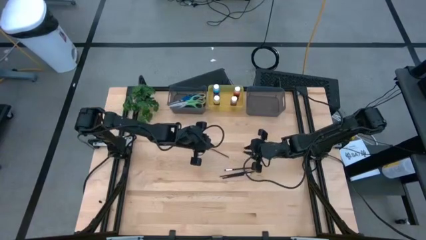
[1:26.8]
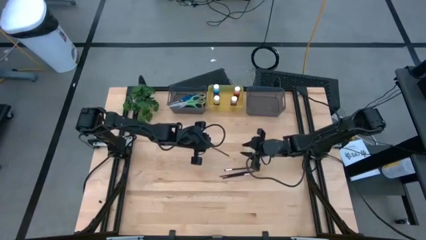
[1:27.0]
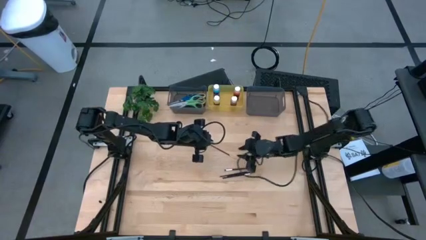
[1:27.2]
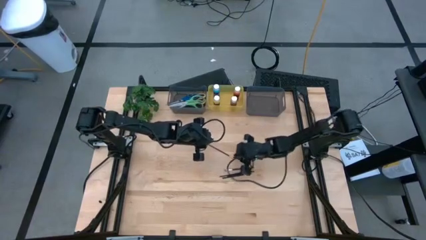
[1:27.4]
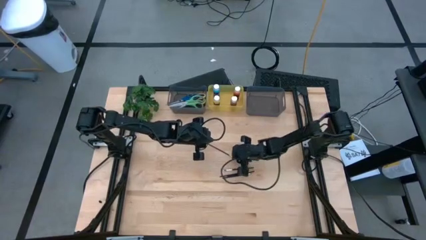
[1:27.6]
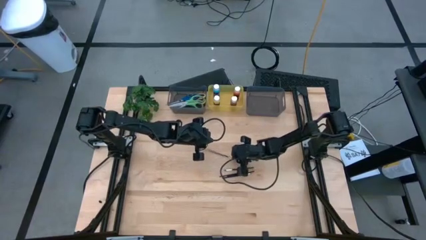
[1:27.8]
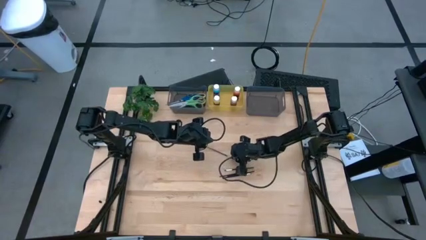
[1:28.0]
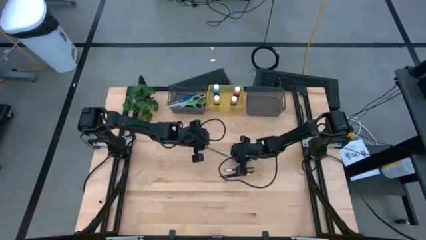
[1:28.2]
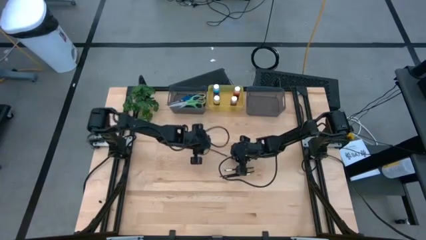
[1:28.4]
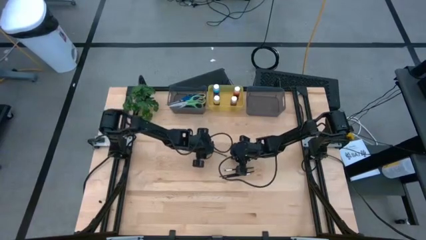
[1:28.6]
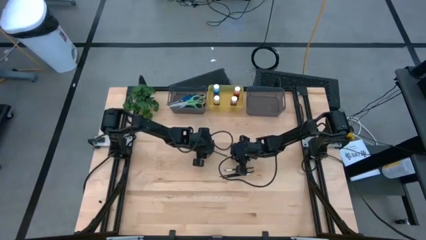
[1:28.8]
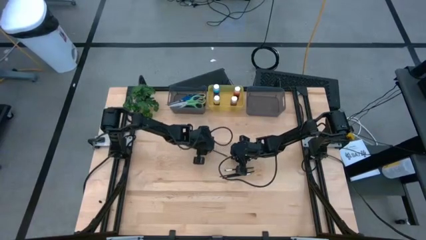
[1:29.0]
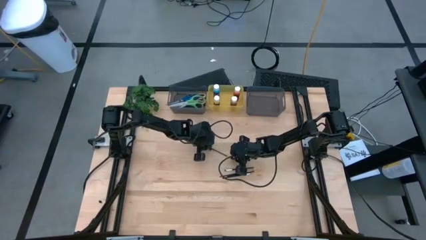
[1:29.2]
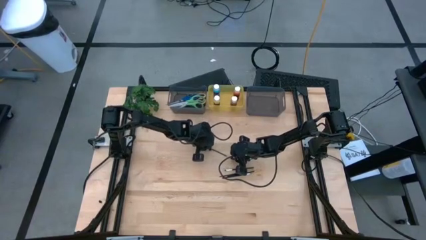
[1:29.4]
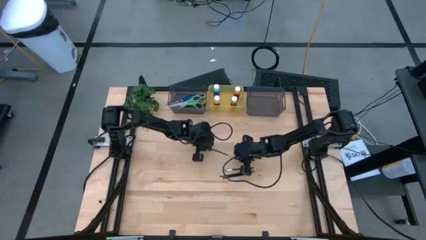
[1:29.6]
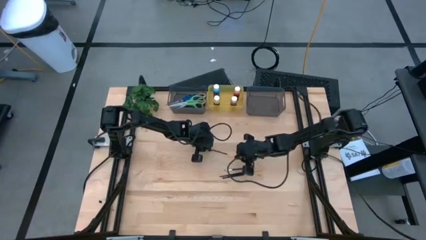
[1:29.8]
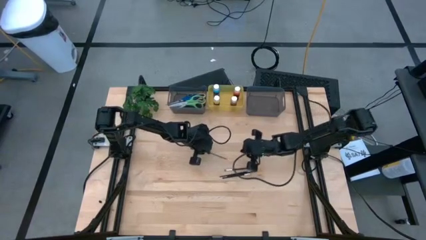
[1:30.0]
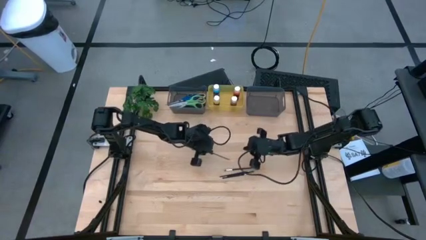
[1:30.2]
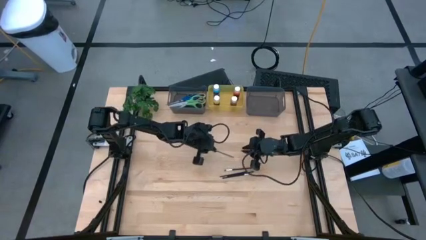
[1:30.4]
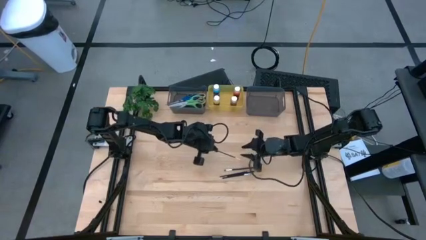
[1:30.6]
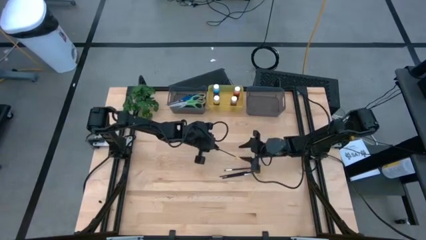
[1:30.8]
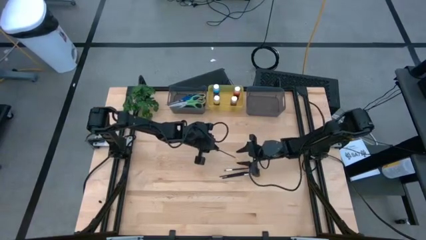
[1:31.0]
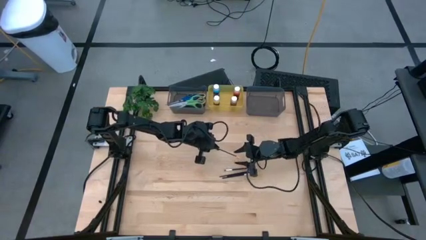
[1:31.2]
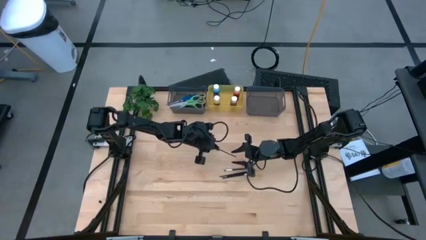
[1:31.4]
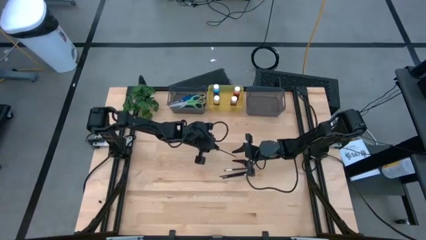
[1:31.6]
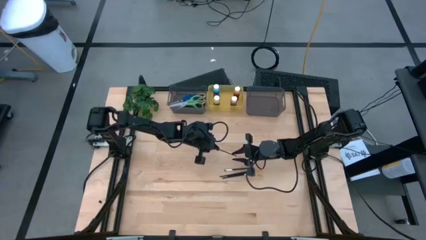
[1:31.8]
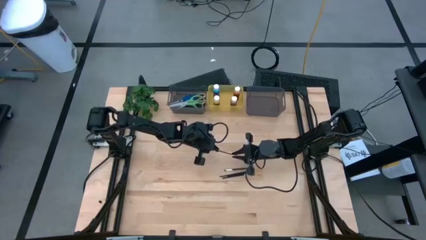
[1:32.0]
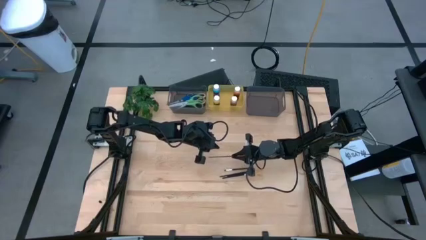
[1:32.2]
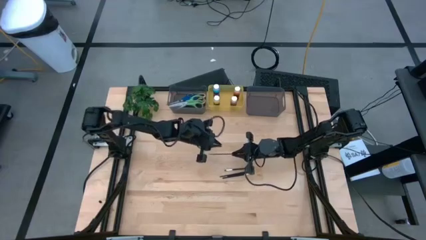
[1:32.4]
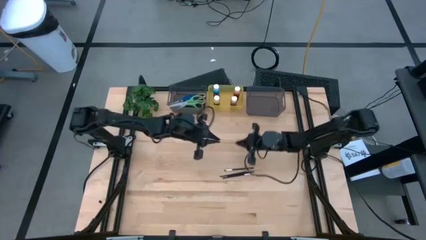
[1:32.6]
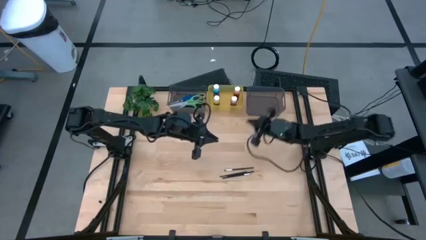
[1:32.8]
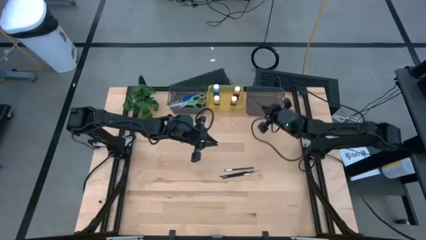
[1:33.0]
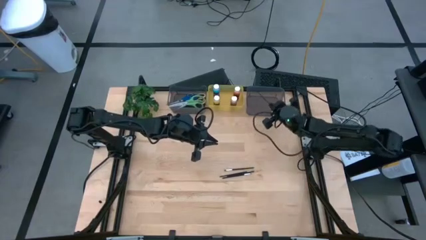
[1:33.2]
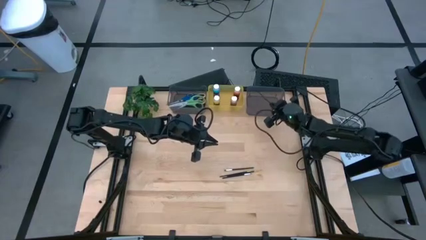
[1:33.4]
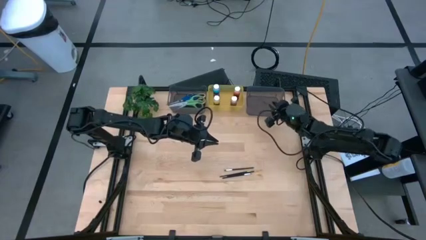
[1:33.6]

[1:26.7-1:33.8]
Task: Pick & Place Paint Supplies
Put the top gold paintbrush into the right black bin

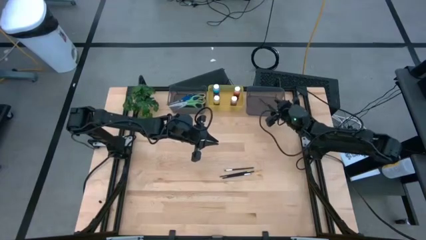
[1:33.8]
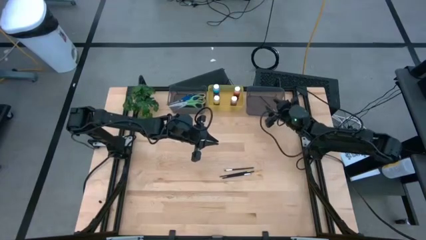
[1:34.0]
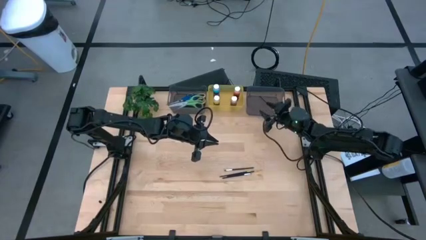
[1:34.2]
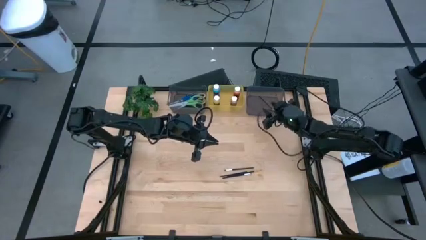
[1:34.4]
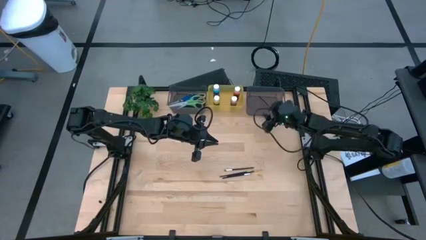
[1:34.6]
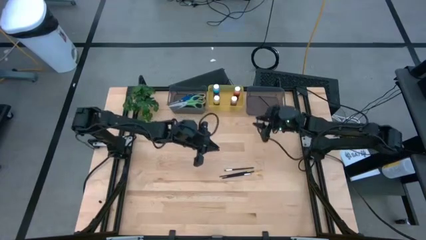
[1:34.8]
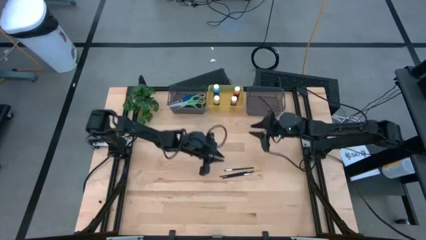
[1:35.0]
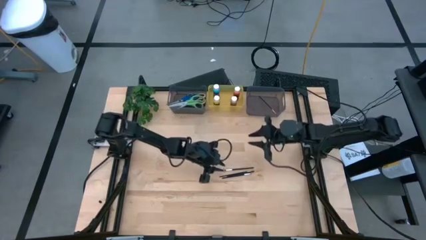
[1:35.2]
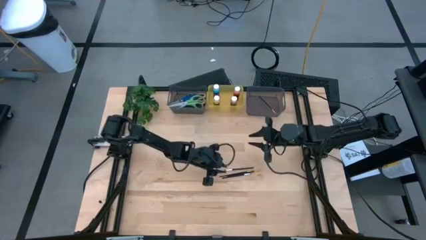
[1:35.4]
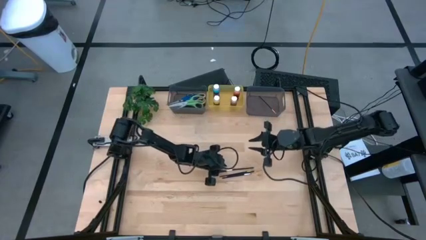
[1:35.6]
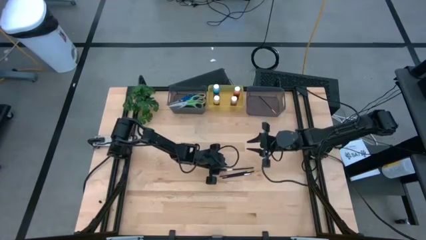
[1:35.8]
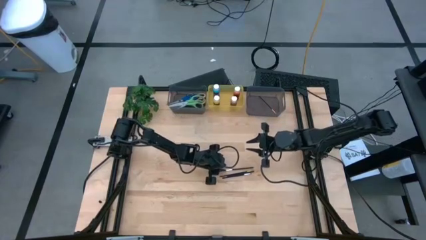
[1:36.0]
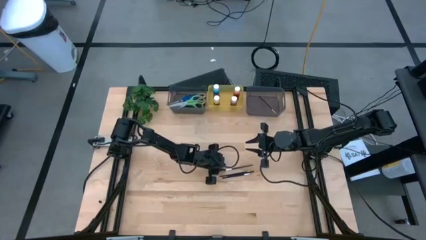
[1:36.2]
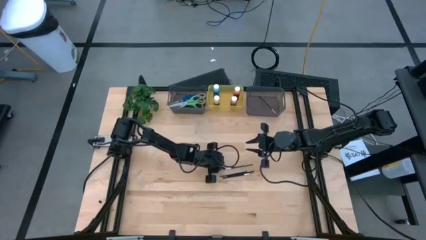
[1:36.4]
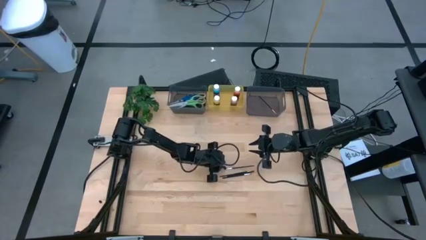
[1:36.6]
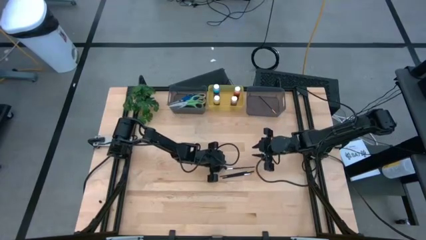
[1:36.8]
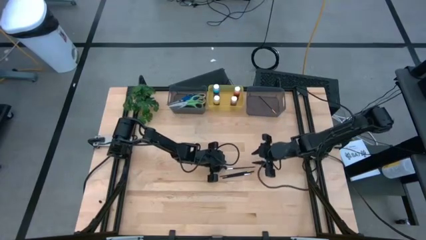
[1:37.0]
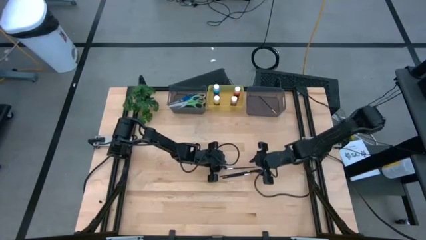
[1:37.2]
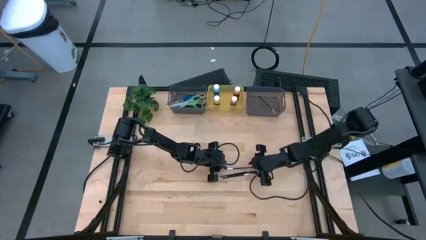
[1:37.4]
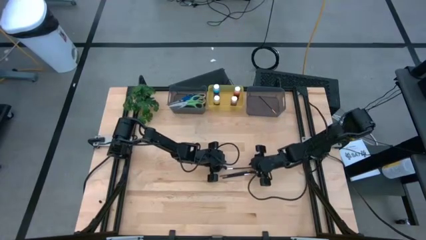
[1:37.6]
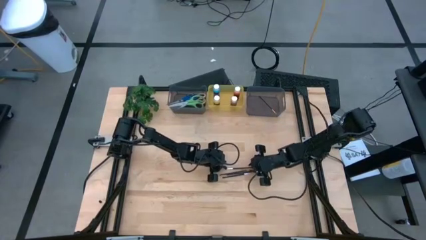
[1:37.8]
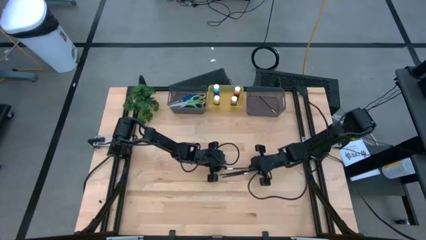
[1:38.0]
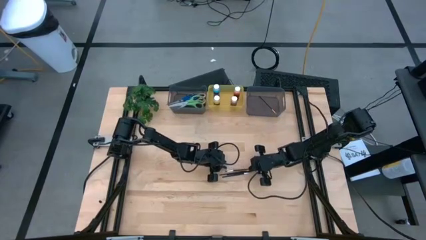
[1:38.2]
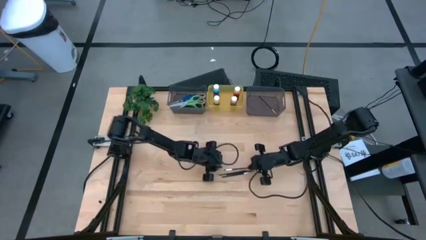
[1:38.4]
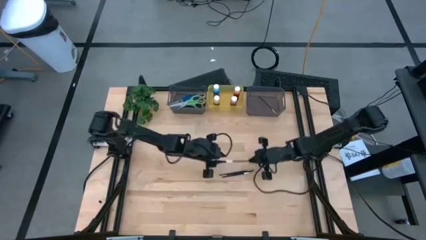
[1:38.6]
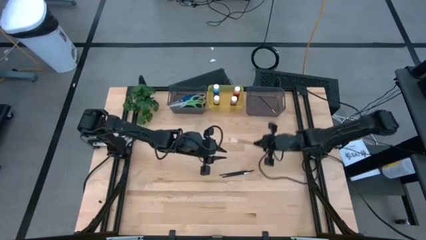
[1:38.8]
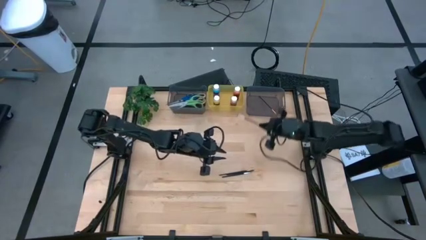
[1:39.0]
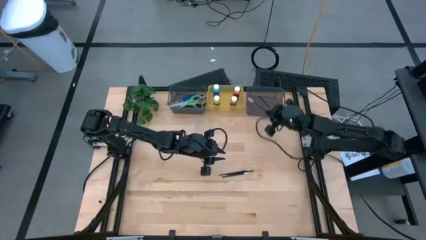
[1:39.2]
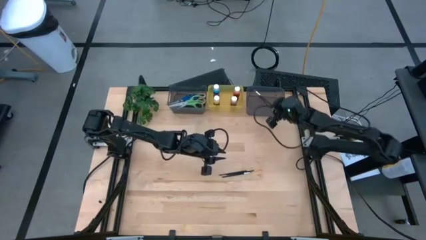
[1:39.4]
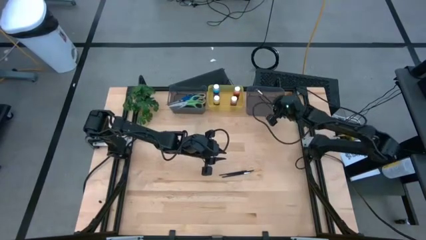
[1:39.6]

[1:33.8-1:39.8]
Put the top silver paintbrush into the right black bin

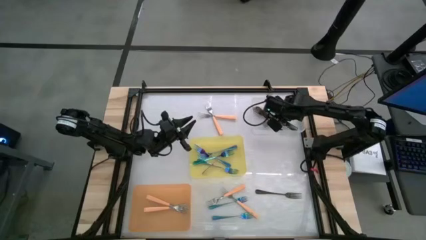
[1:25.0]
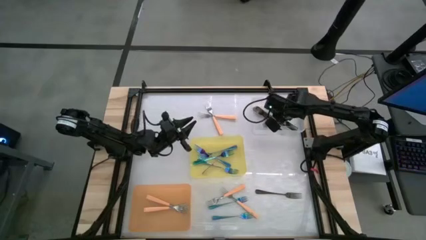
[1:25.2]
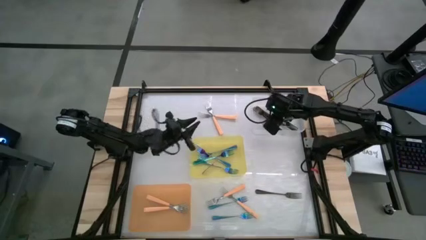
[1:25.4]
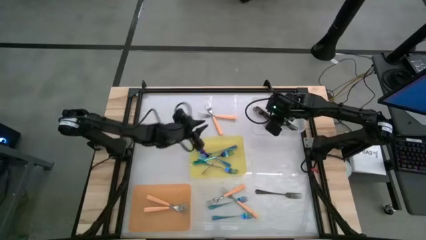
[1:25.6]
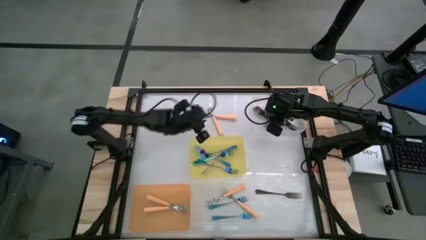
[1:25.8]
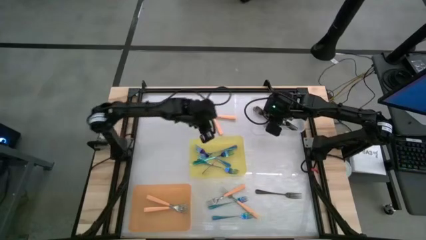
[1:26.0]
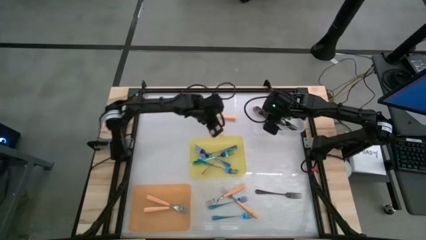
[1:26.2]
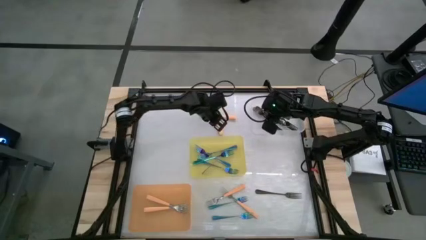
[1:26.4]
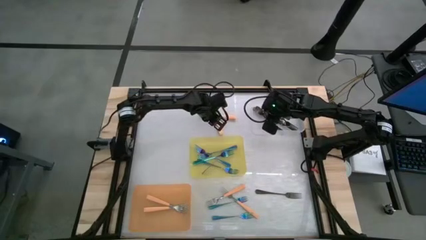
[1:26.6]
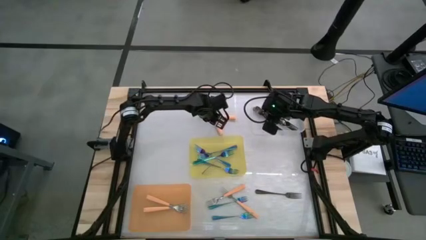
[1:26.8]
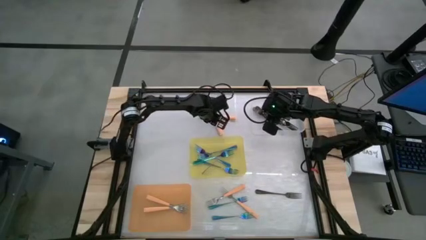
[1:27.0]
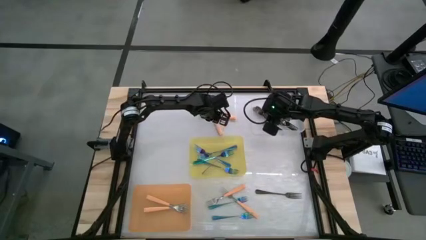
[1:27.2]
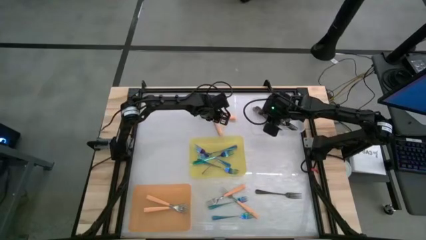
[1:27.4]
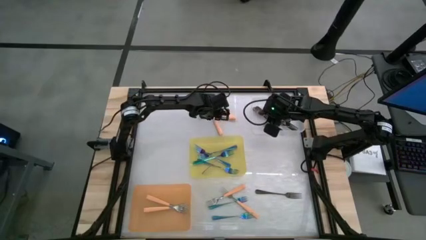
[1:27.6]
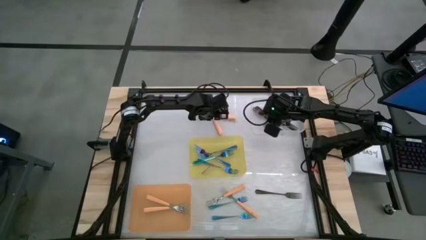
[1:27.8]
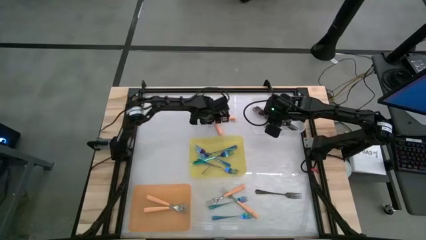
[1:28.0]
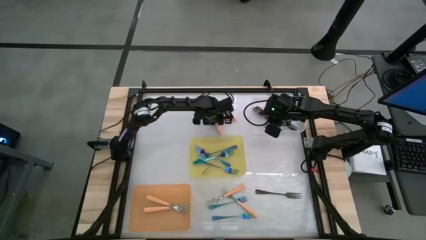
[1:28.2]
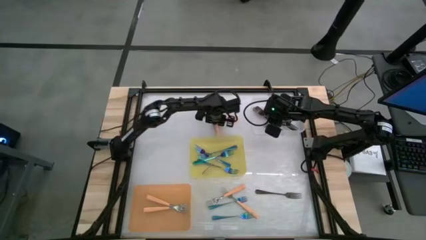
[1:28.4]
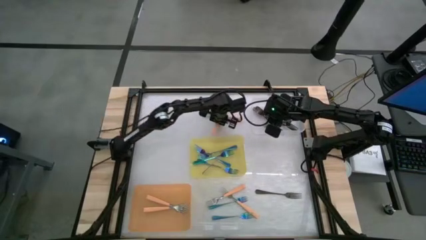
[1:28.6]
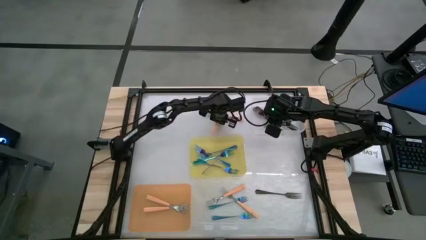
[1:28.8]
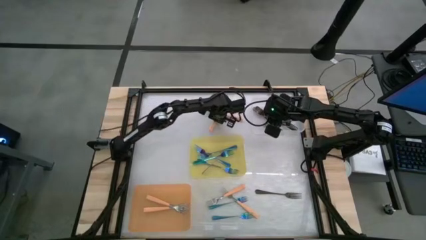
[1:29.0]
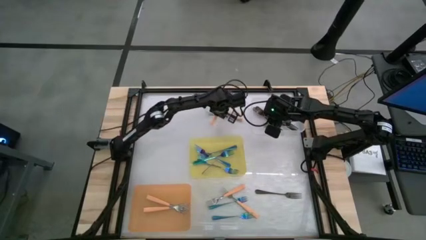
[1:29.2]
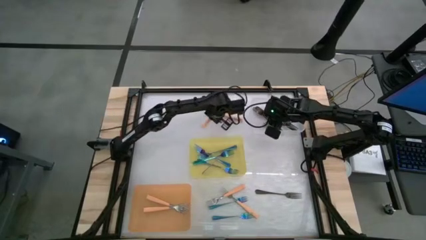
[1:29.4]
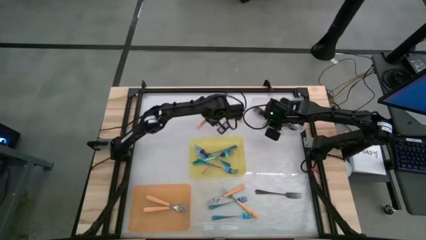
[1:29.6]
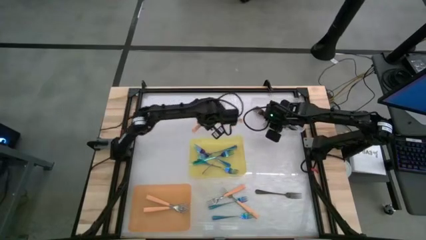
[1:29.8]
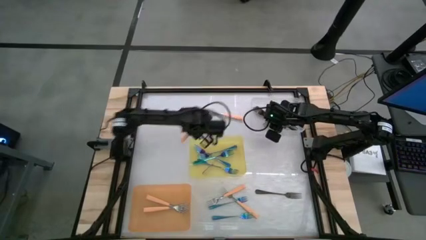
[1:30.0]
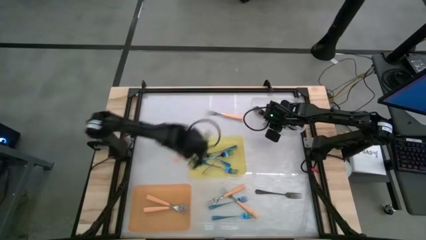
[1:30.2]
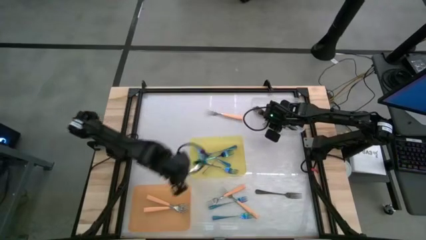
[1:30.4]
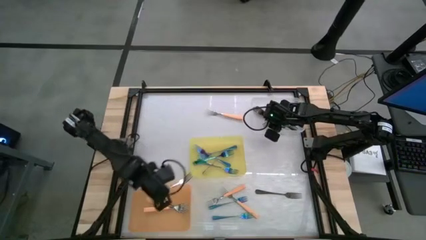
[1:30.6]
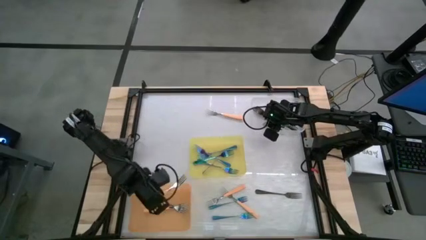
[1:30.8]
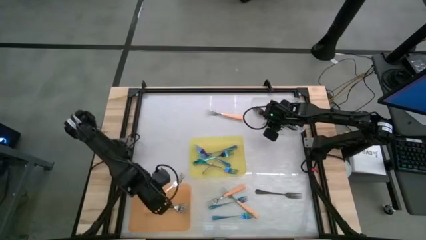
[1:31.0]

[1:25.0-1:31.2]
Task: Sort silverware by color (type)
Put the orange fork into the orange bin
